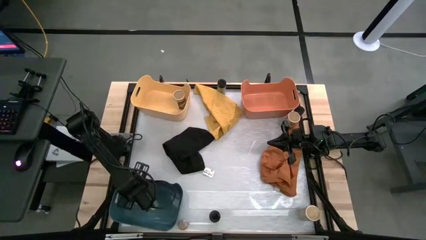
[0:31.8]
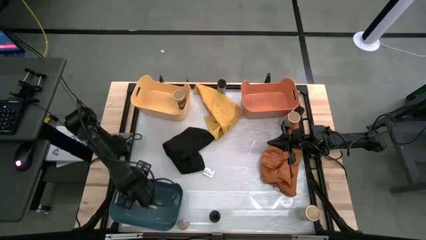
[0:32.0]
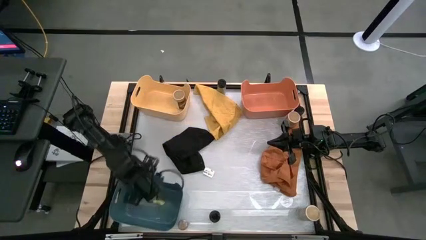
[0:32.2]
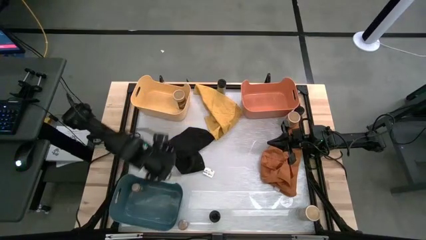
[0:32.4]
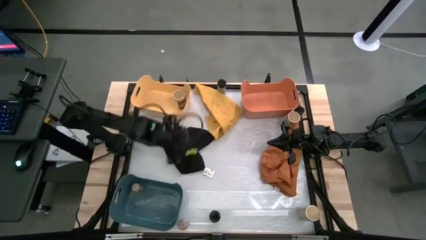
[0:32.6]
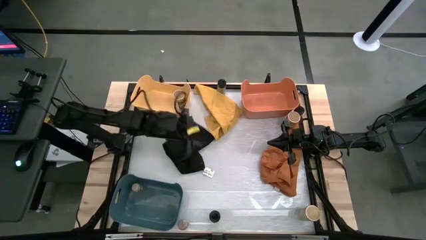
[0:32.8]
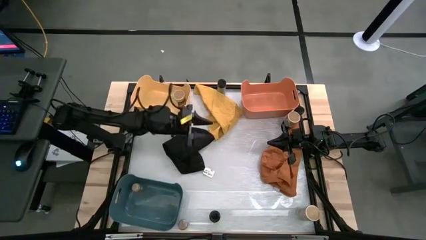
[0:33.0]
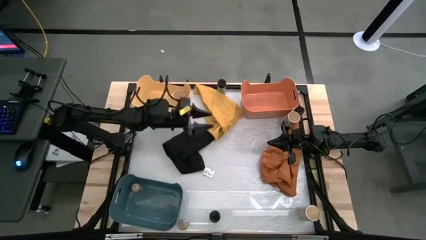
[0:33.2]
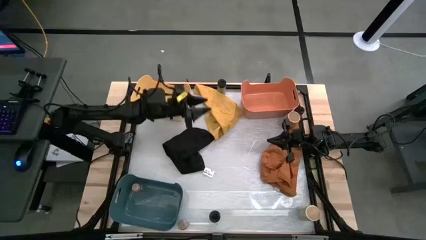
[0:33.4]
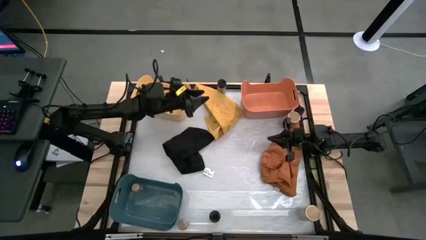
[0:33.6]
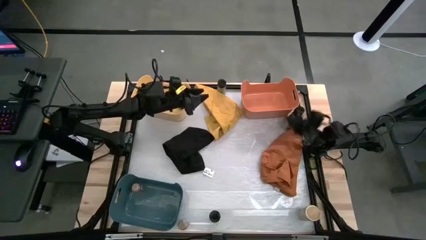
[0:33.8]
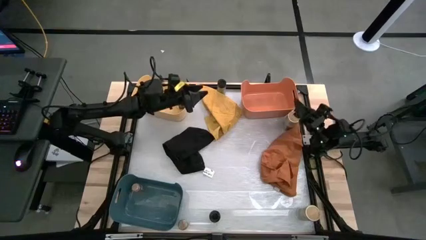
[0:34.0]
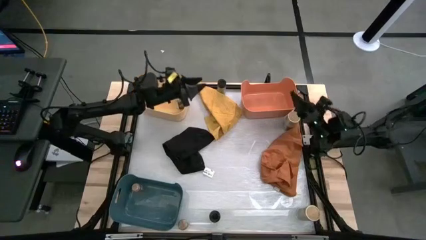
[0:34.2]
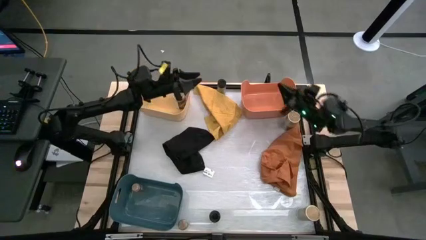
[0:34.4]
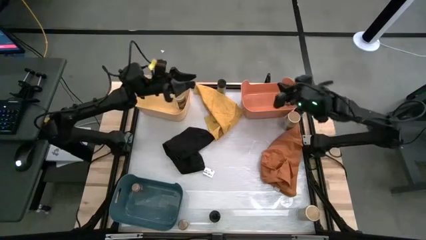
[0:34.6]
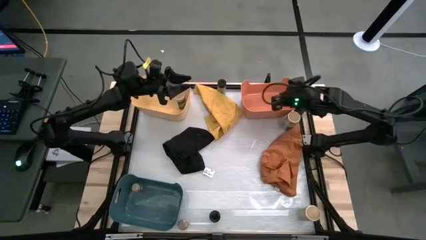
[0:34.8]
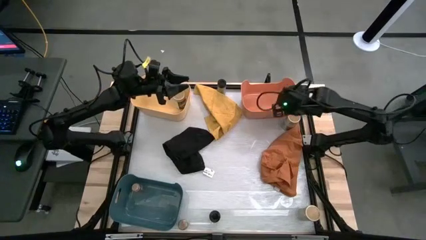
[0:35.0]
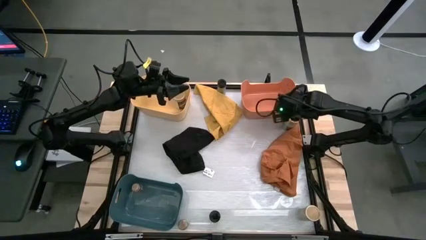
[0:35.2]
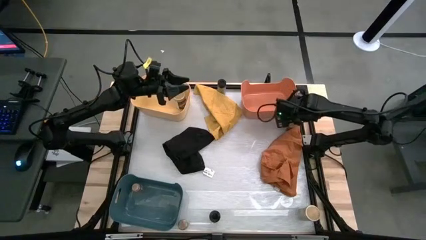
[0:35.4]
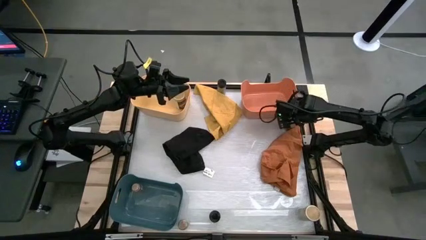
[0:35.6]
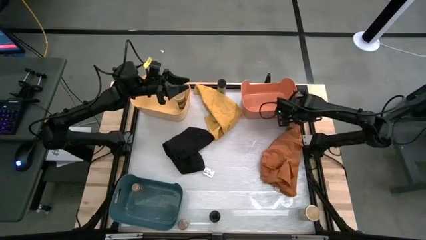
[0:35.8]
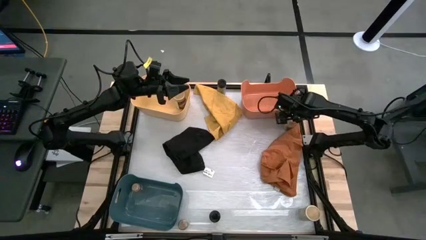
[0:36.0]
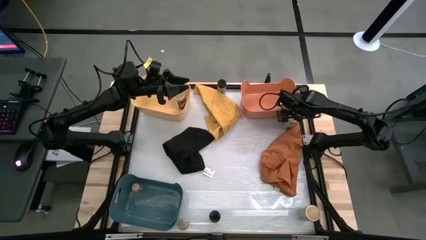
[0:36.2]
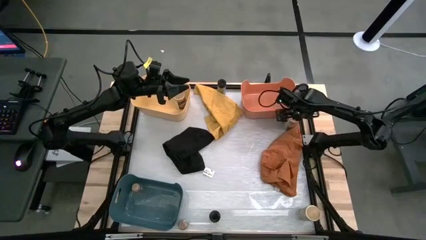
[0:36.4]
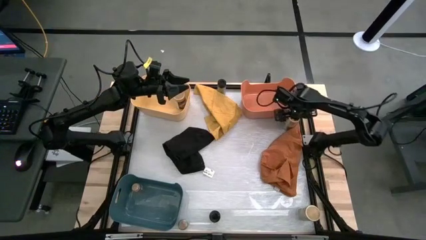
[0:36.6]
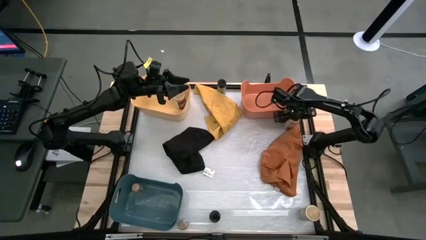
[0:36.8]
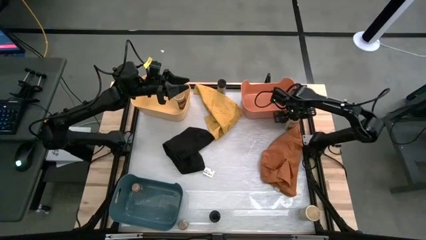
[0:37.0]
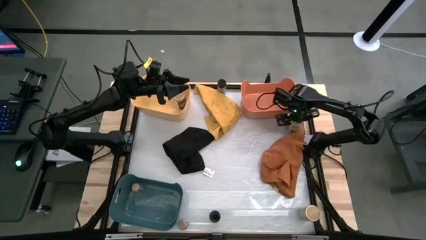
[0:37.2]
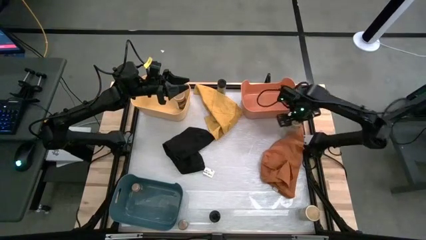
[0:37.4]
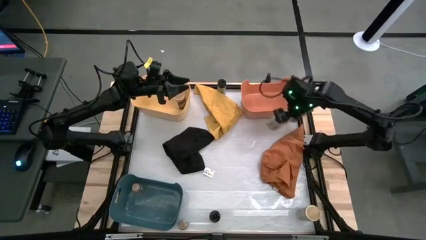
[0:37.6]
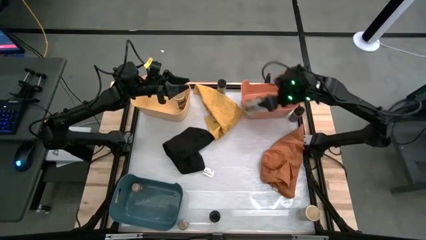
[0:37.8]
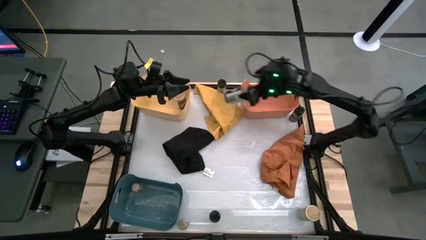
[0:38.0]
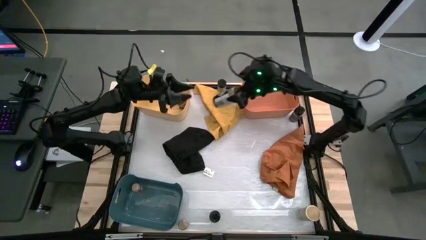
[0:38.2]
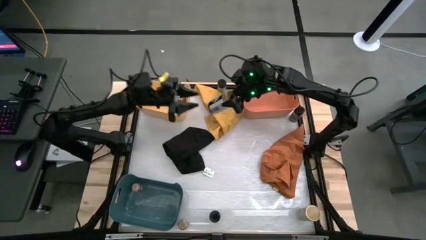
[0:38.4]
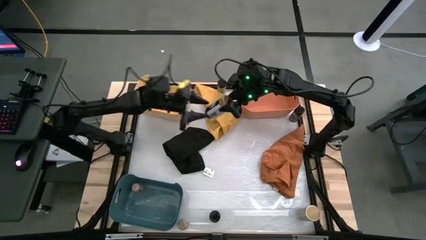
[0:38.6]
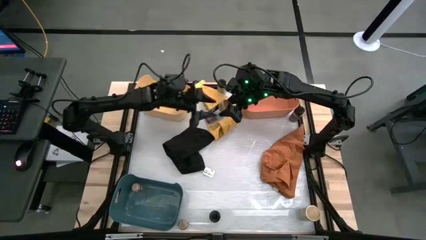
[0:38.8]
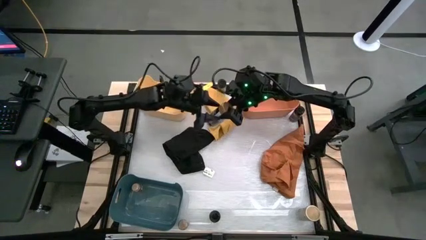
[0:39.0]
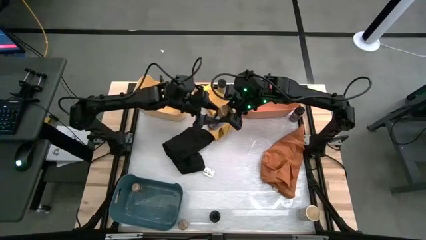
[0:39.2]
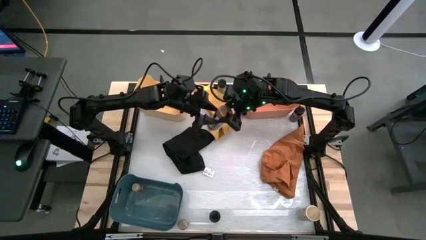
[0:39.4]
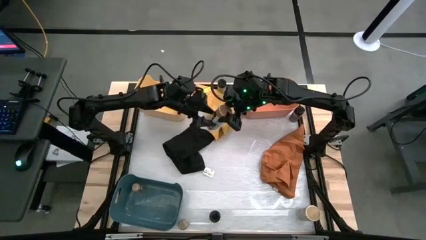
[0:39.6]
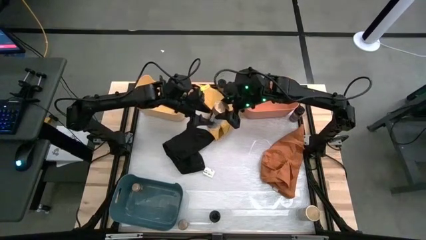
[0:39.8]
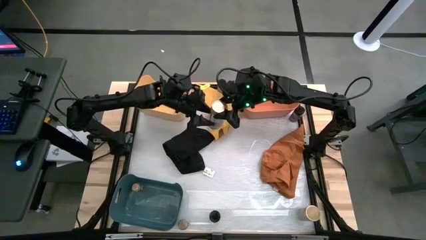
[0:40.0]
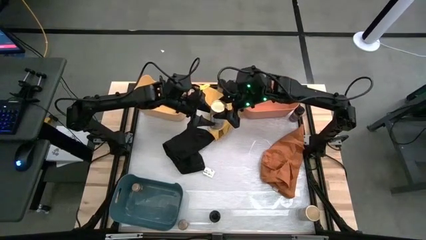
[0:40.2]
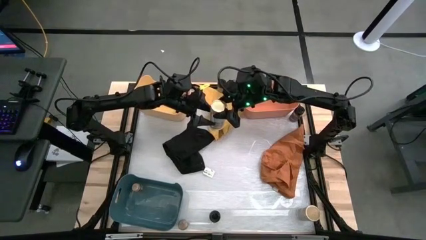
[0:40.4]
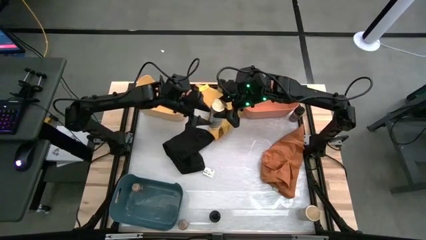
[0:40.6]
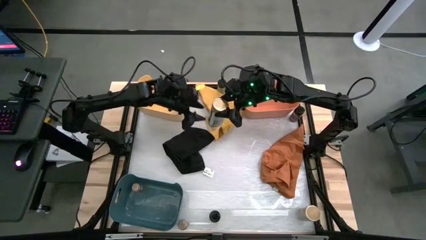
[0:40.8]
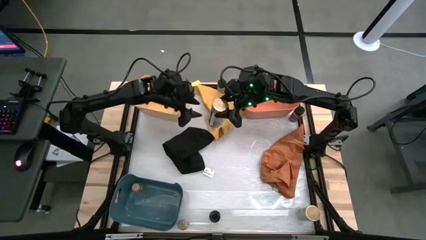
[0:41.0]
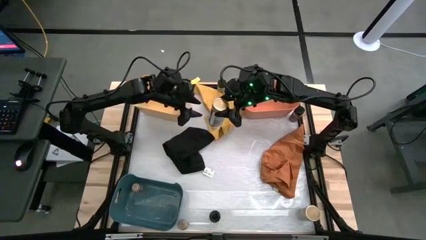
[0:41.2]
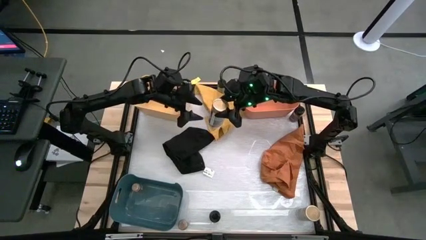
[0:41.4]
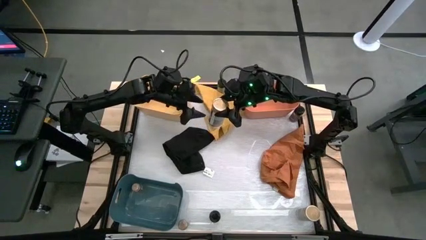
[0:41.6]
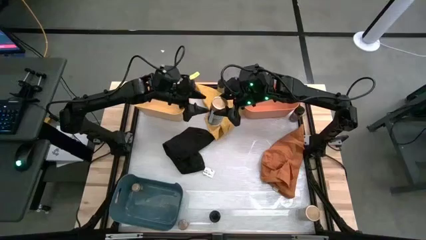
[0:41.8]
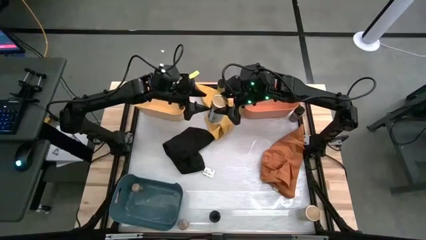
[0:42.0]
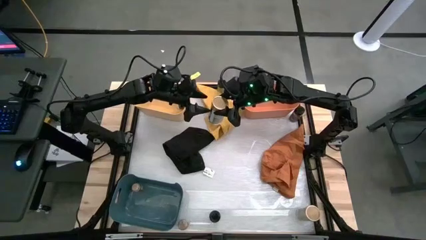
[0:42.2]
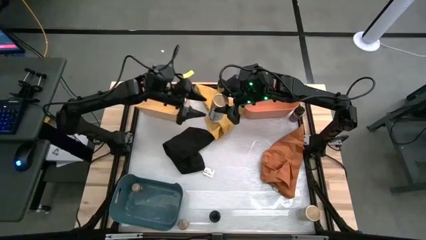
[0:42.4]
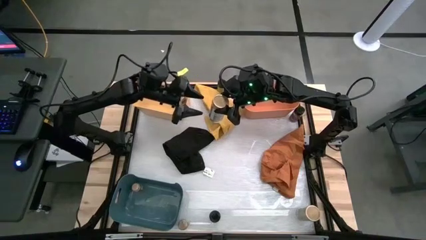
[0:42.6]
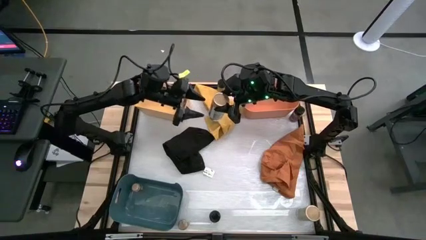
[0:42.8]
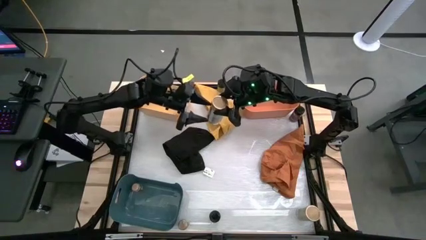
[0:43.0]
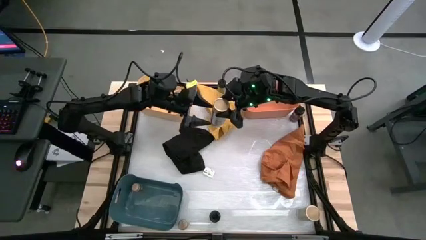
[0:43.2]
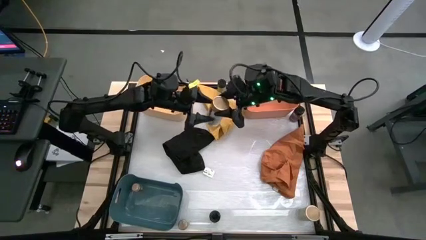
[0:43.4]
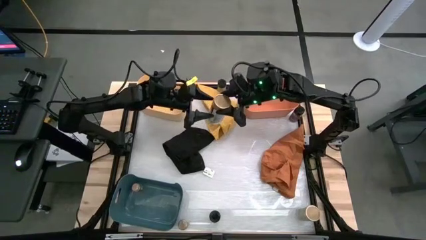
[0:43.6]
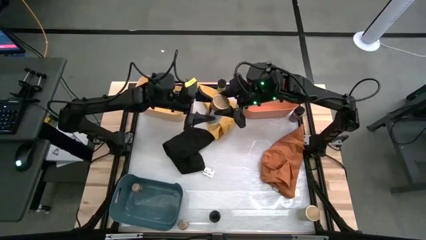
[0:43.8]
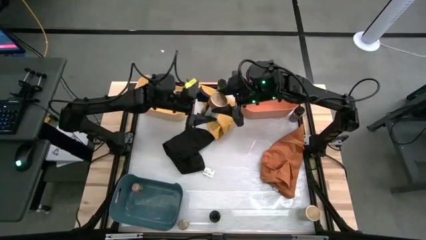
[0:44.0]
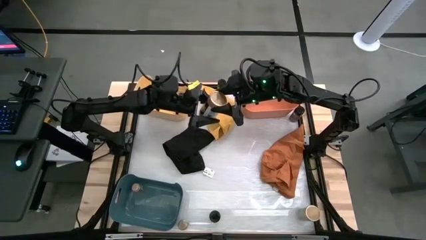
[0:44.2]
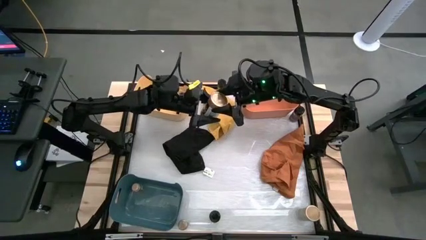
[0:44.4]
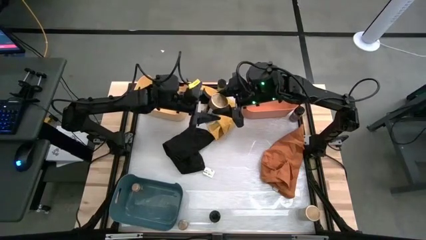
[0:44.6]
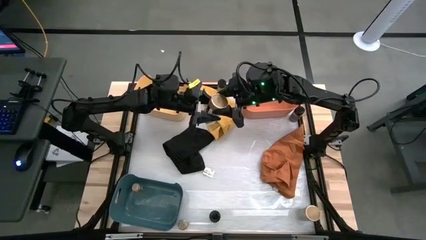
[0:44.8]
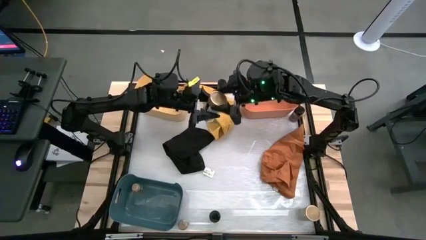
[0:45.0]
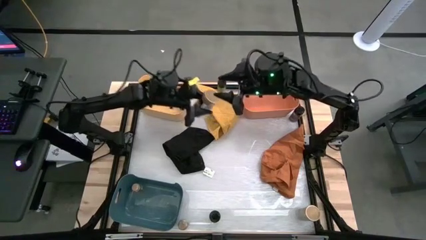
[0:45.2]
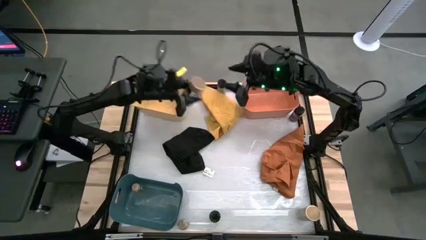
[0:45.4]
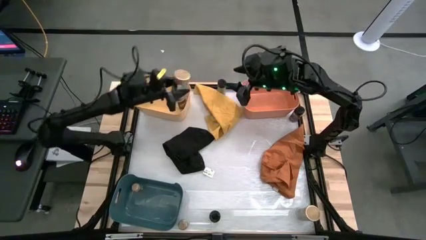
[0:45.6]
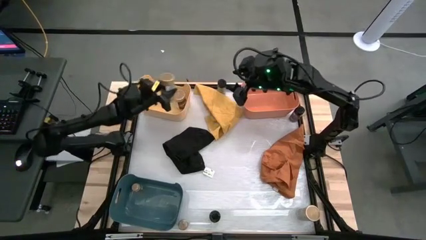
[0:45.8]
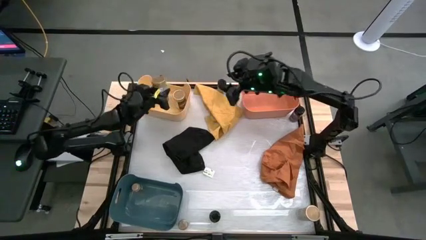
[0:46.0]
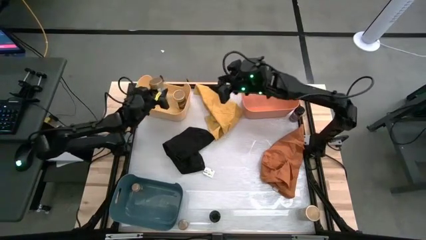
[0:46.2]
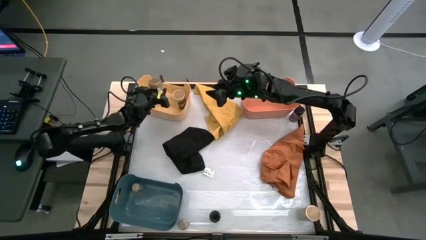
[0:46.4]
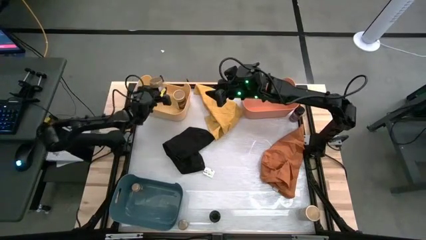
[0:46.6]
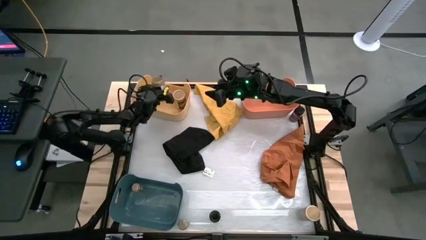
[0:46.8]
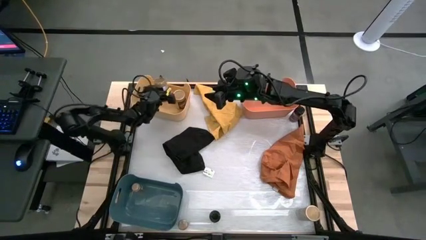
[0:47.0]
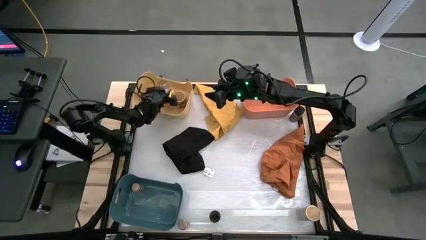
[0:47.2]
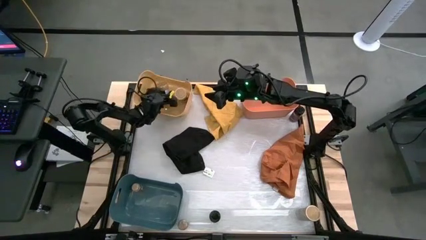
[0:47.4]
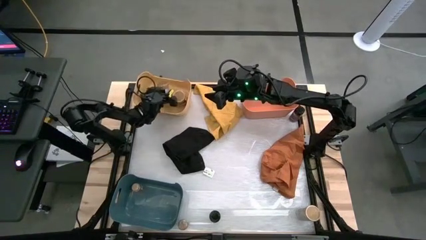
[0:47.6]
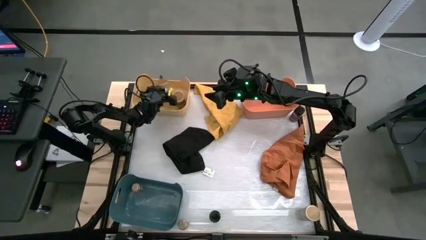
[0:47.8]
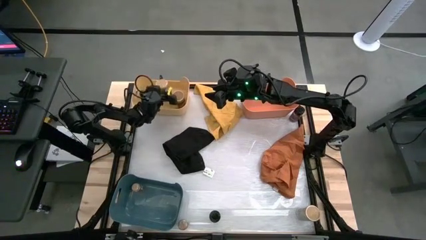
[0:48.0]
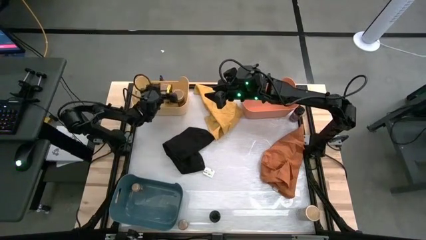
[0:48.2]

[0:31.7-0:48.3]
Task: Sort spices by type
Put the top gold seasoning bottle into the yellow bin
